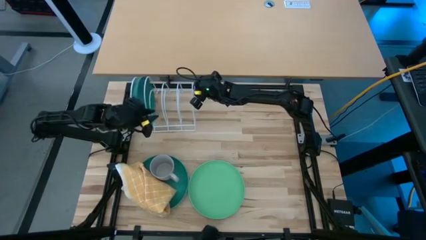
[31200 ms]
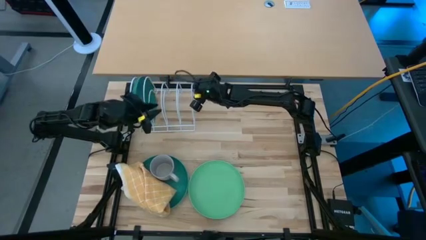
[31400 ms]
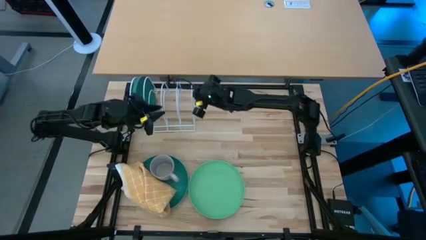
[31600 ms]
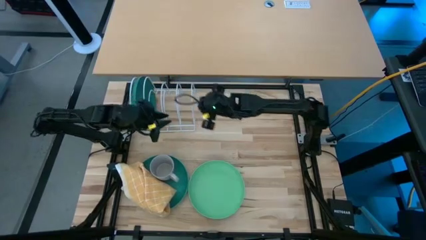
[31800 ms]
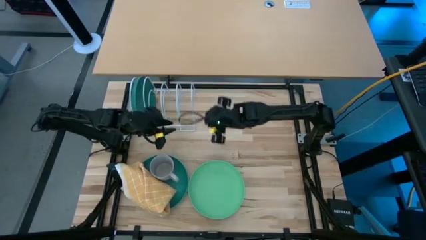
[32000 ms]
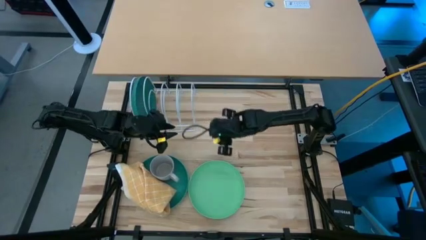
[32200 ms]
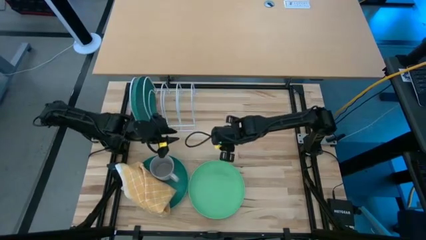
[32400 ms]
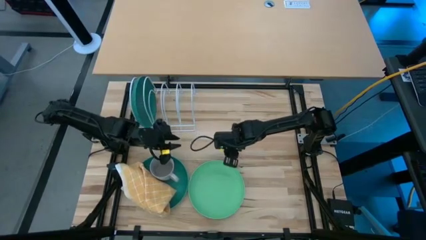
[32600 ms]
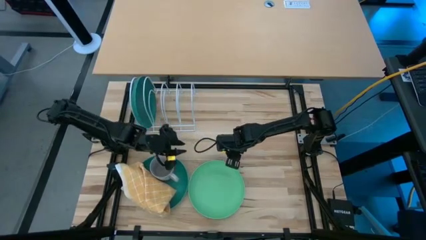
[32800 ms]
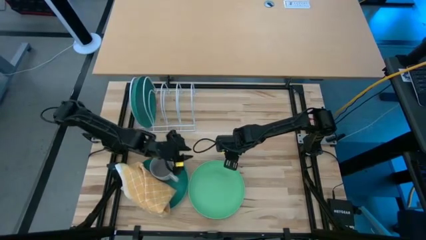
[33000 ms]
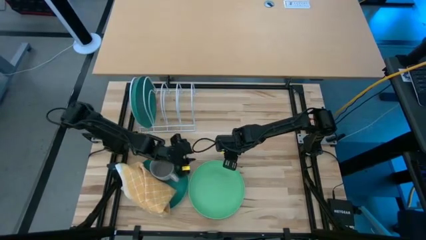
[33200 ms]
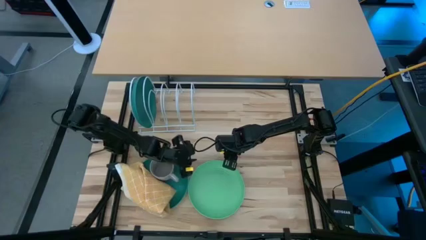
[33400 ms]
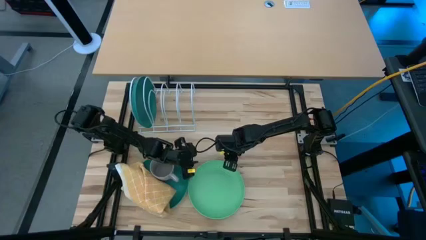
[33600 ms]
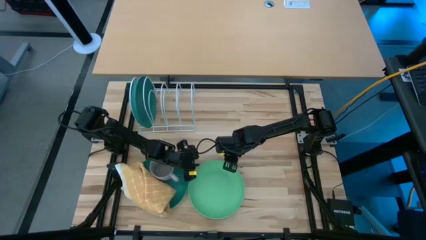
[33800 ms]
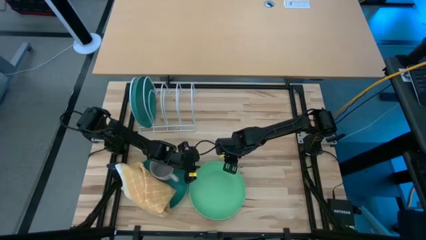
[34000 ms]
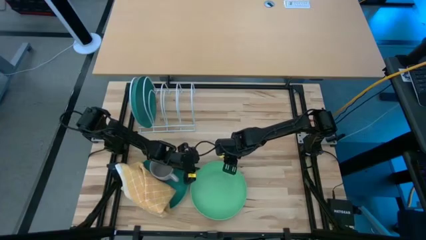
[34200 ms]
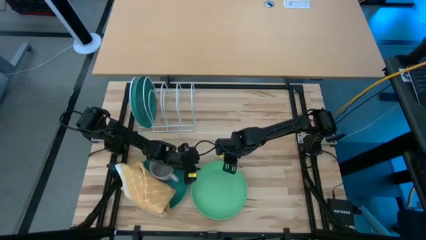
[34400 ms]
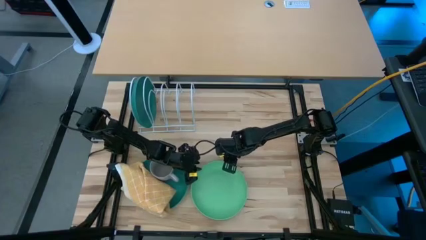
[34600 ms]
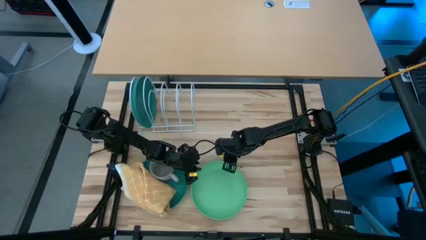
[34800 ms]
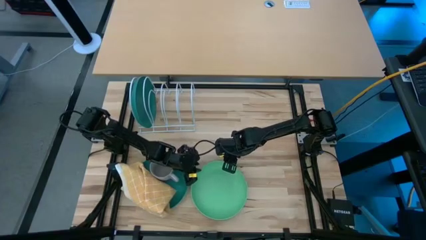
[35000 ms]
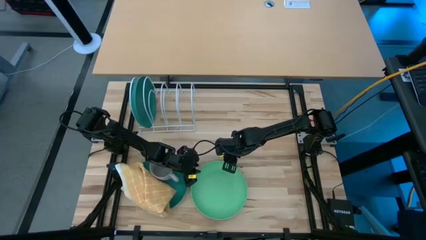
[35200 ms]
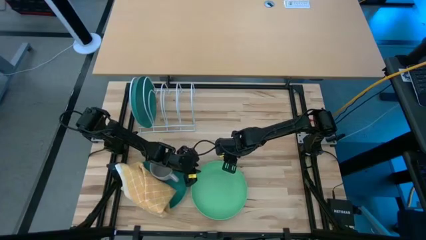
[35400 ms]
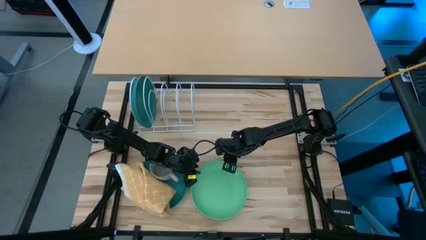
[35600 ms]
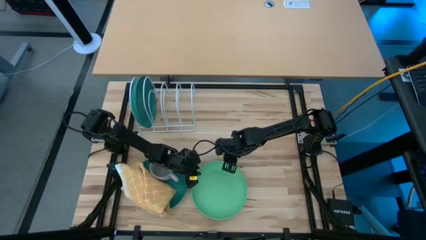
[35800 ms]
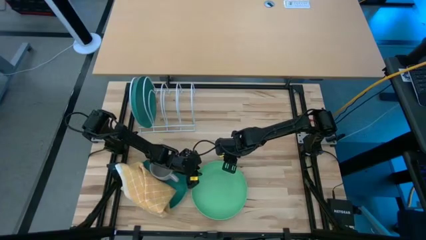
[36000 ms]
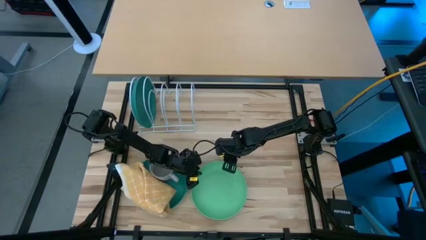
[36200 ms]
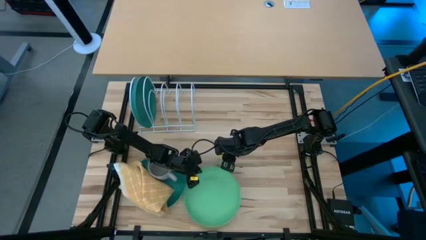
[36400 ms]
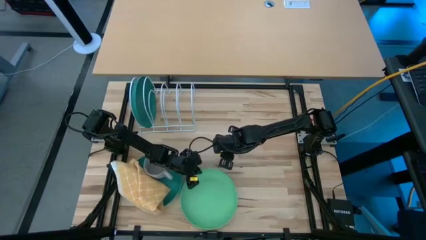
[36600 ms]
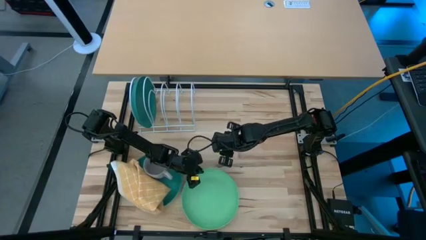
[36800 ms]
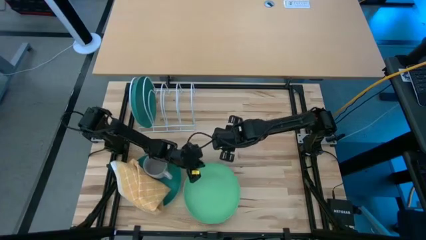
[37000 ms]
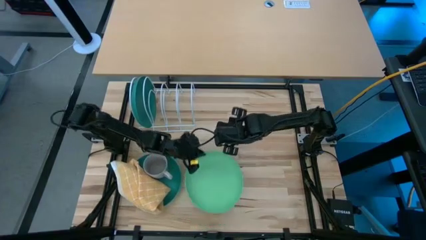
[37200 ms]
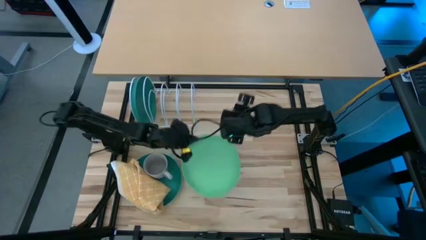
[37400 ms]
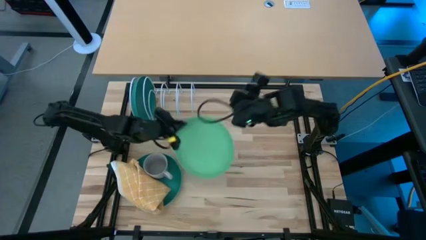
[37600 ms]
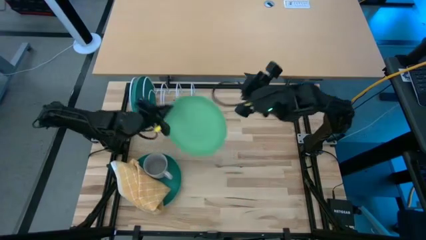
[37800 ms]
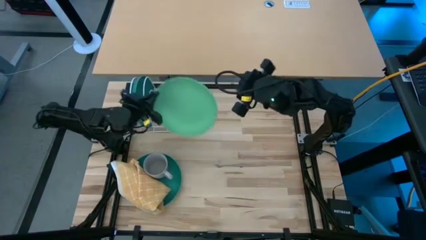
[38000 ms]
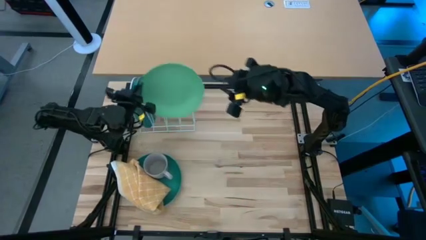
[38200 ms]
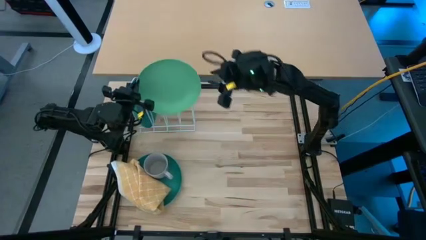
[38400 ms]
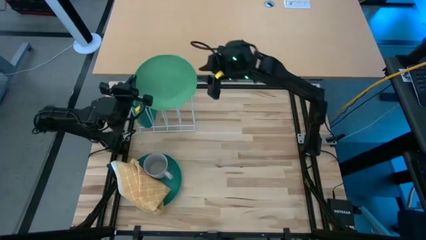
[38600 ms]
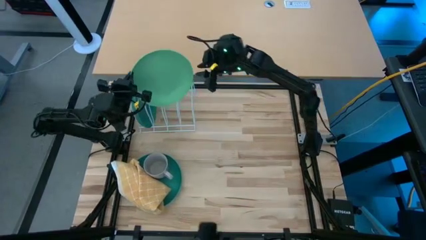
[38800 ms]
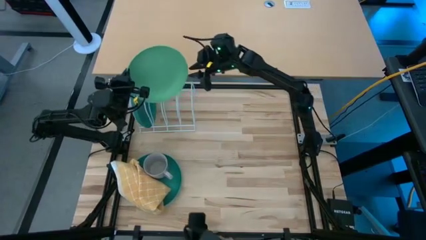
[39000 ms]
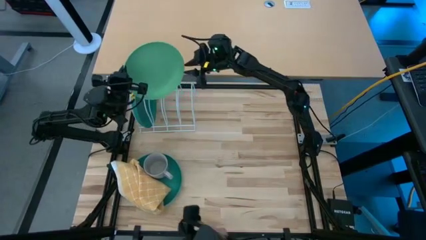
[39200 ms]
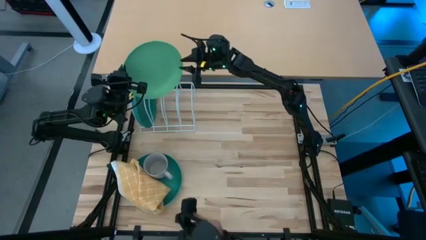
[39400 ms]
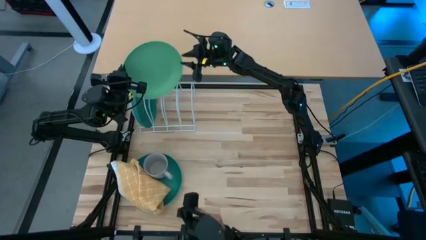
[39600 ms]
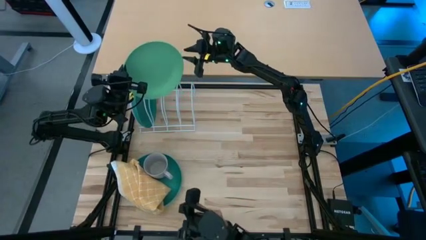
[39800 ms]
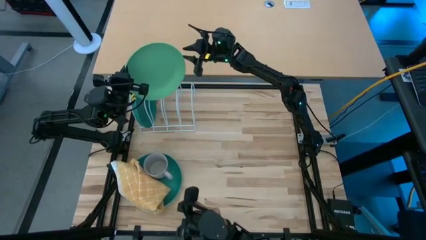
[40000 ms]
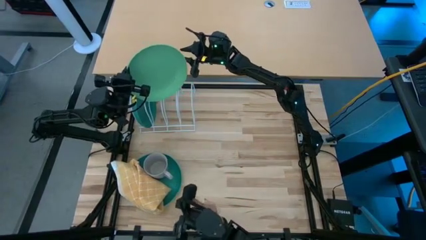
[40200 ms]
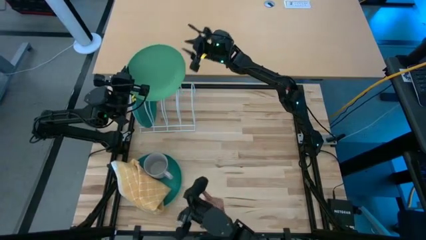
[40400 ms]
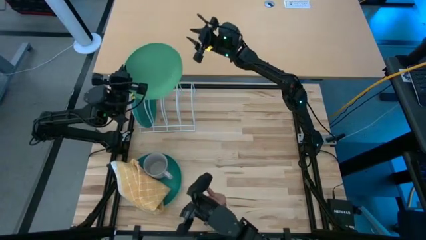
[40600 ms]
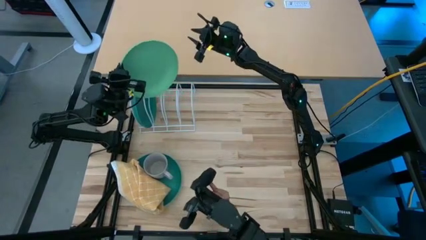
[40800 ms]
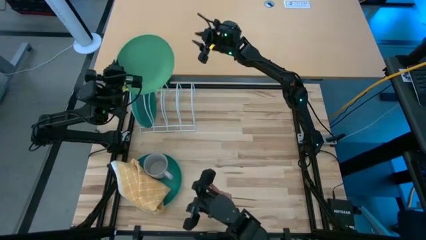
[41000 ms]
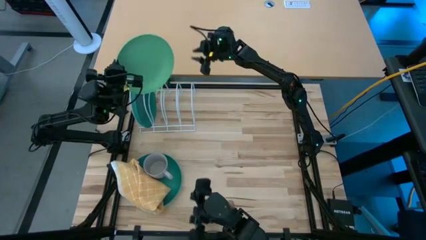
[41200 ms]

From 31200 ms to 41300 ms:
Task: Sort dishes
Put the right light green plate into the dish rack
